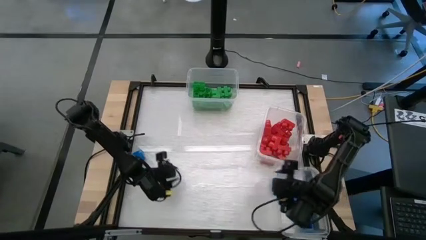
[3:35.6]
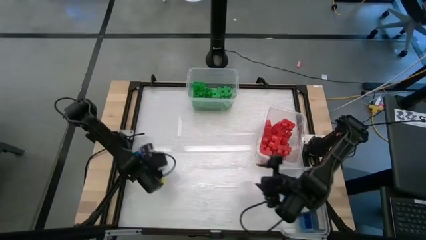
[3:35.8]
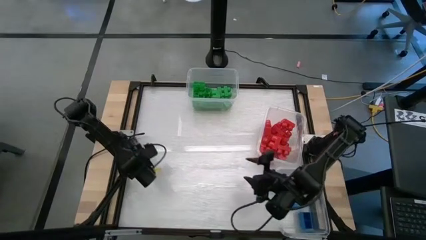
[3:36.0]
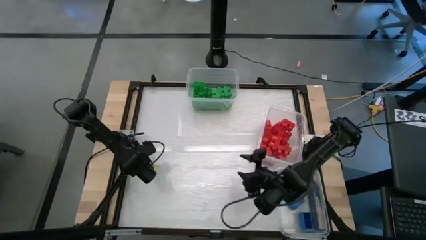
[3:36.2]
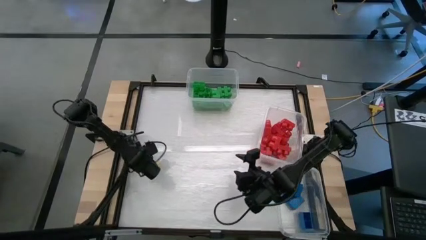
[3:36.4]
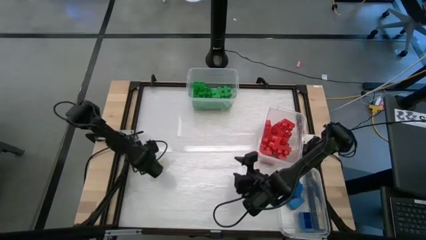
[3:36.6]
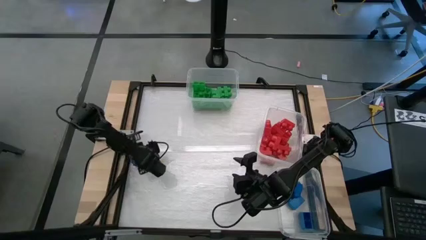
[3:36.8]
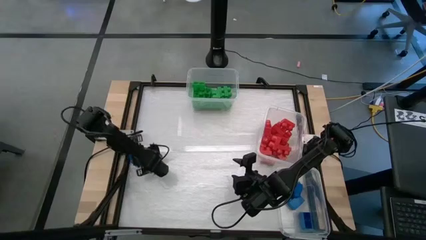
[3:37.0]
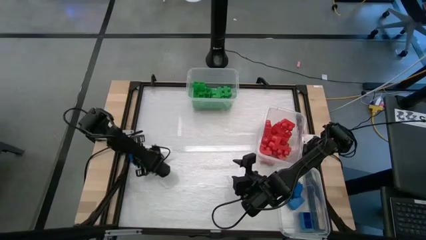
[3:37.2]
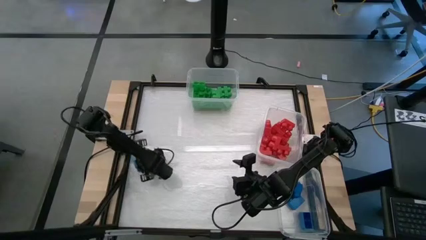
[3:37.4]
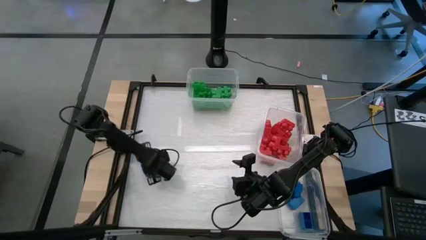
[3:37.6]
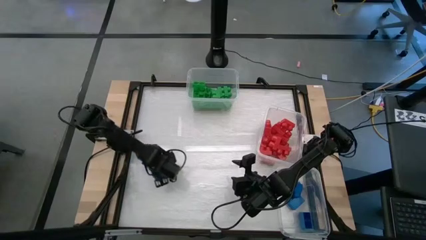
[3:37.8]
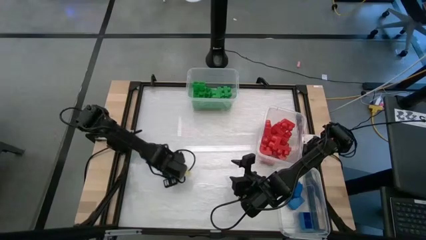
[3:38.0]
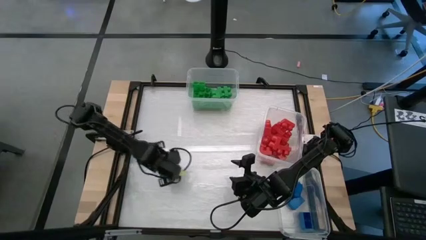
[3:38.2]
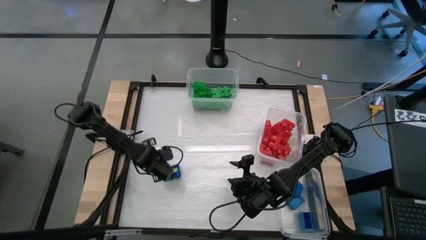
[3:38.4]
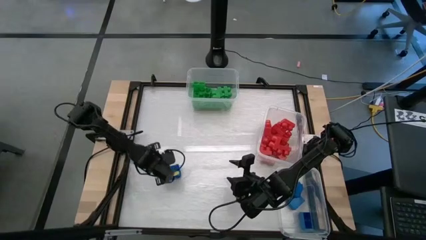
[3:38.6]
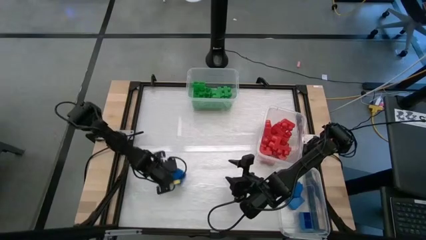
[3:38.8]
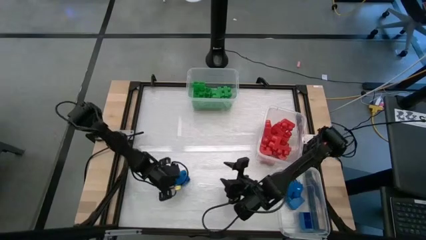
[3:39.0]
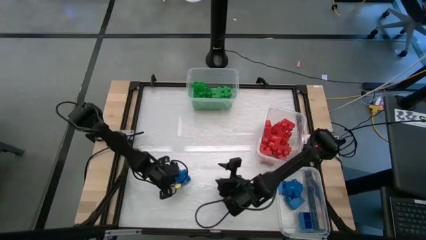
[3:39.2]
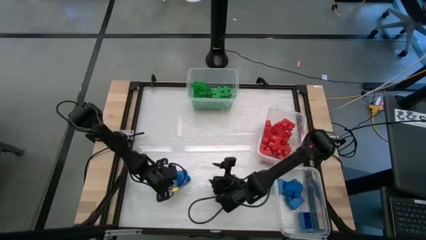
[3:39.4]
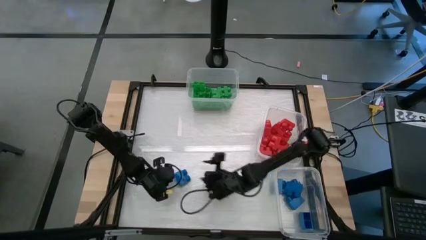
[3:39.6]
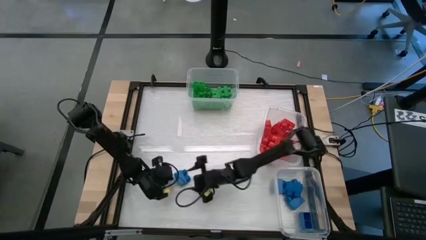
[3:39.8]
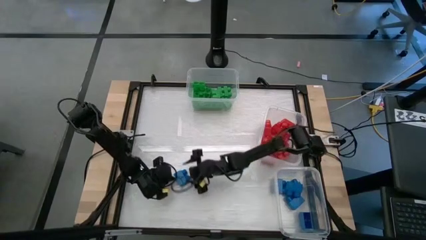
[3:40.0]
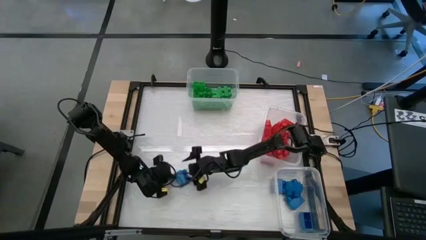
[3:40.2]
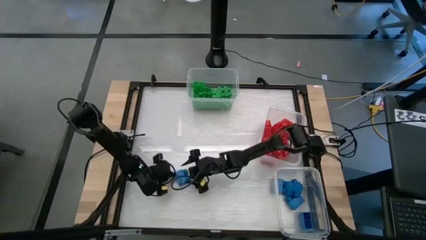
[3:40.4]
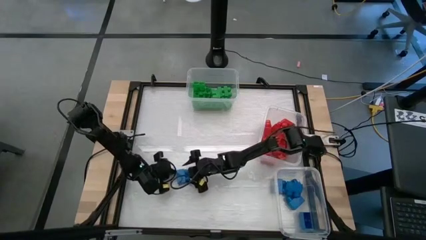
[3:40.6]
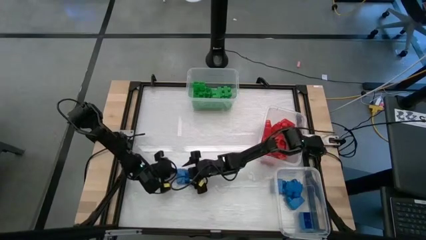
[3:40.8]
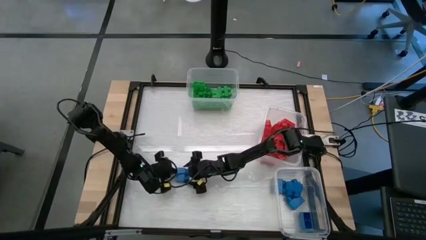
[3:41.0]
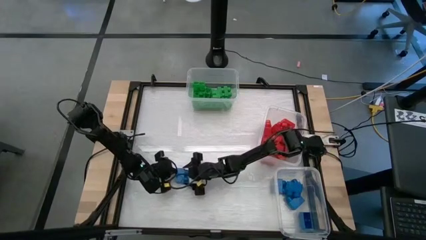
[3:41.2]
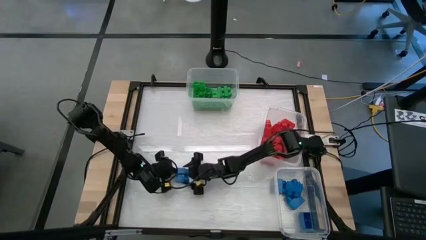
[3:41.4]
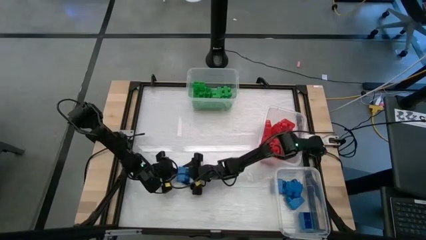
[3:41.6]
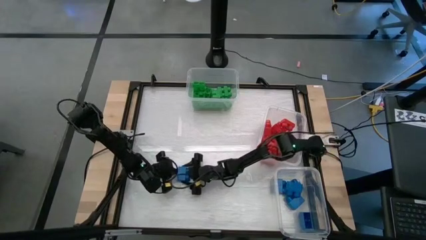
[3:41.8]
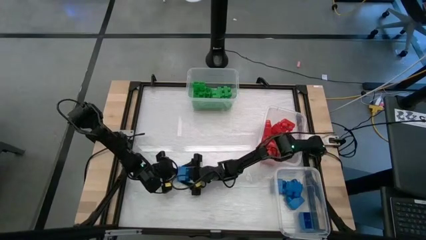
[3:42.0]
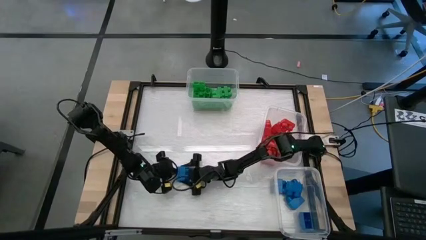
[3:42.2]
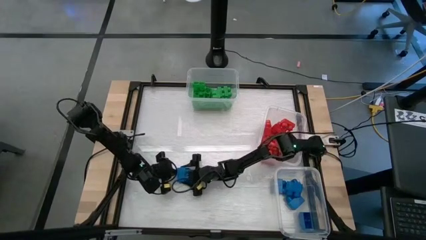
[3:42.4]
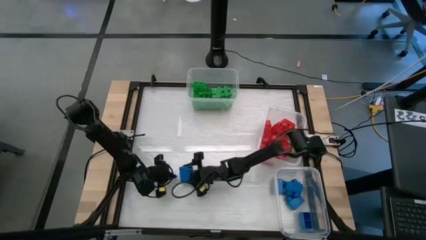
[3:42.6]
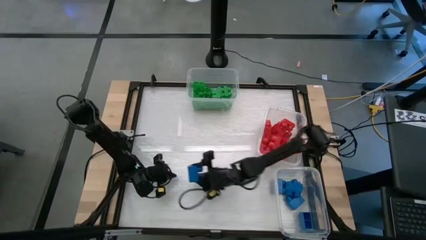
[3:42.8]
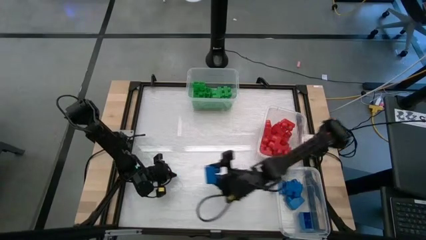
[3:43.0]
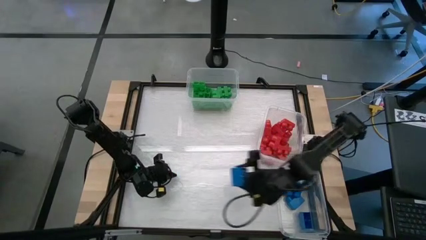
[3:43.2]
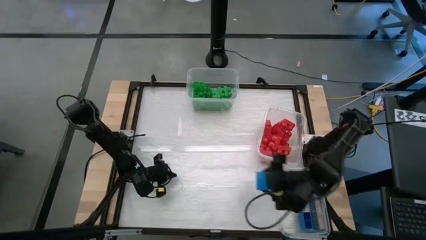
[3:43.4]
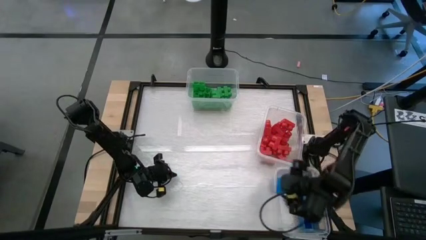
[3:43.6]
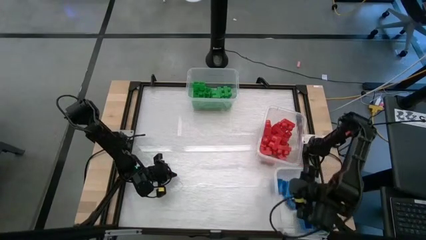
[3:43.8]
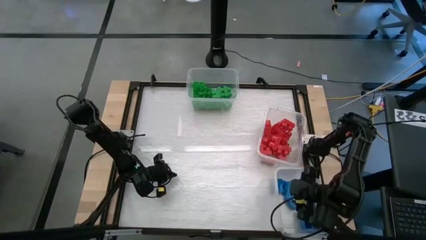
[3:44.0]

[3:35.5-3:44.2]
Task: Sort blocks
Put the blue game piece into the bottom right transparent bin

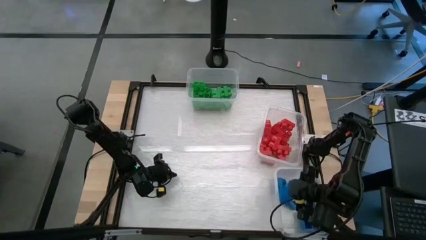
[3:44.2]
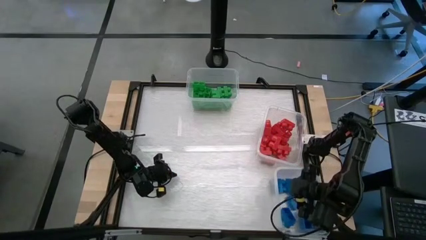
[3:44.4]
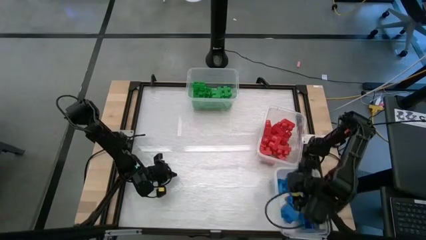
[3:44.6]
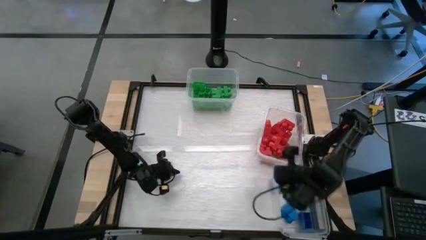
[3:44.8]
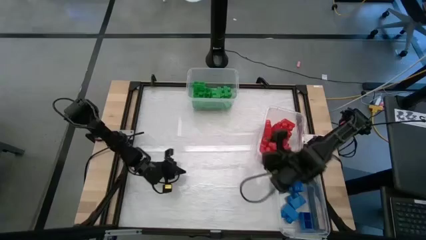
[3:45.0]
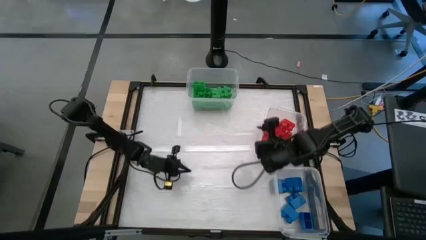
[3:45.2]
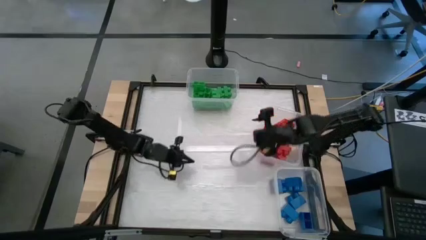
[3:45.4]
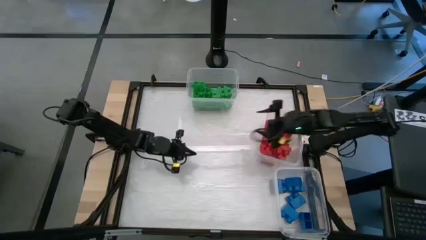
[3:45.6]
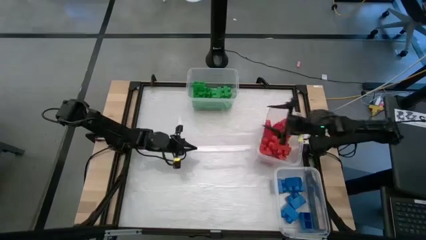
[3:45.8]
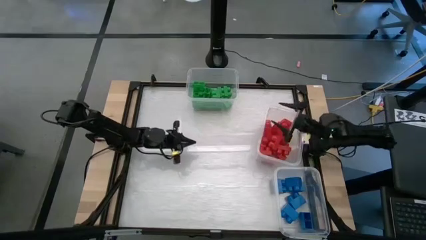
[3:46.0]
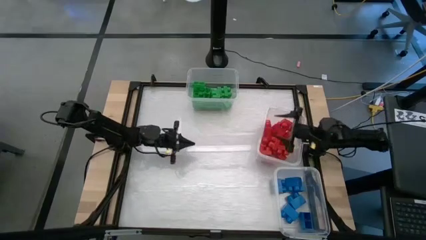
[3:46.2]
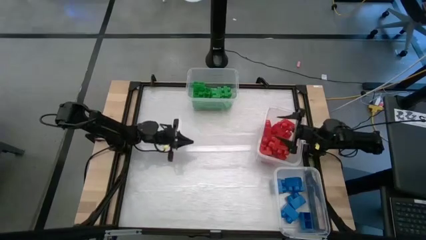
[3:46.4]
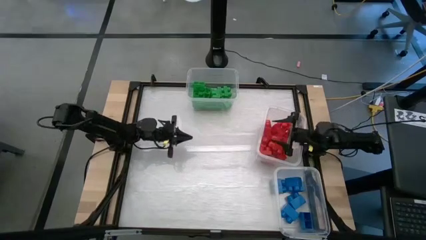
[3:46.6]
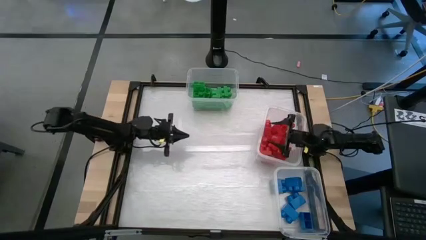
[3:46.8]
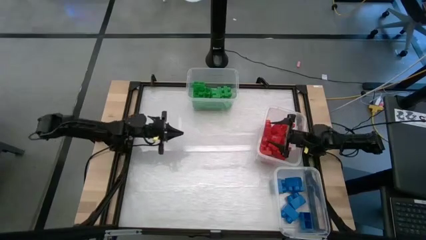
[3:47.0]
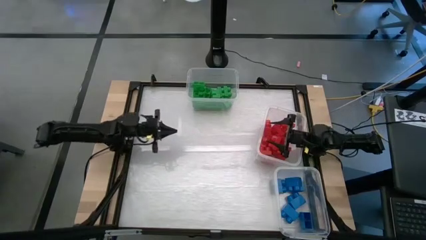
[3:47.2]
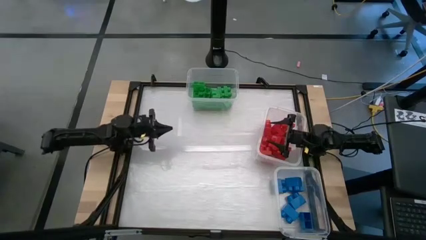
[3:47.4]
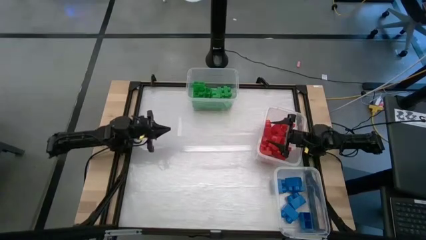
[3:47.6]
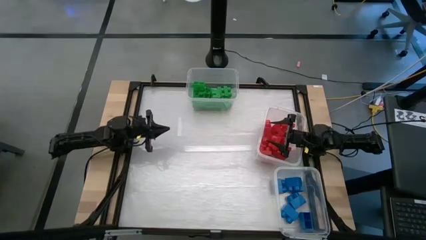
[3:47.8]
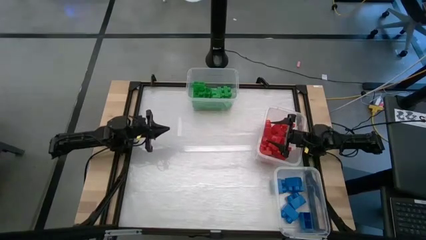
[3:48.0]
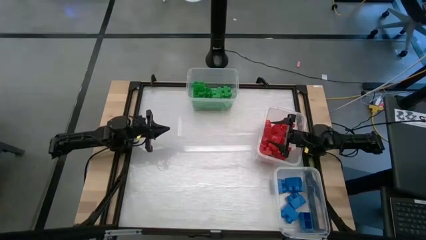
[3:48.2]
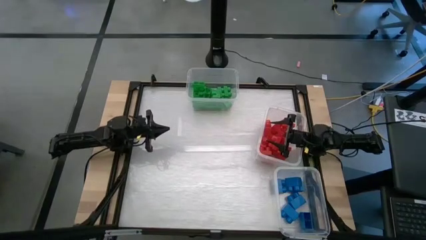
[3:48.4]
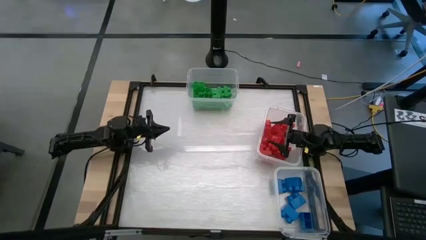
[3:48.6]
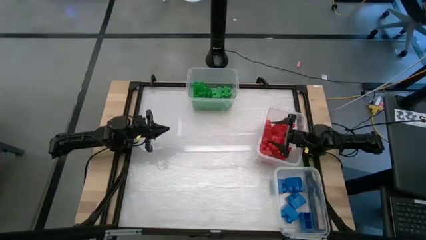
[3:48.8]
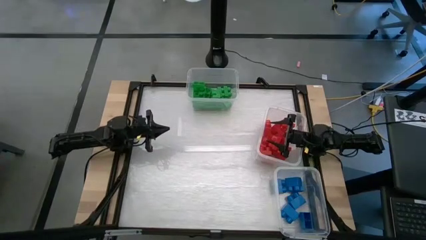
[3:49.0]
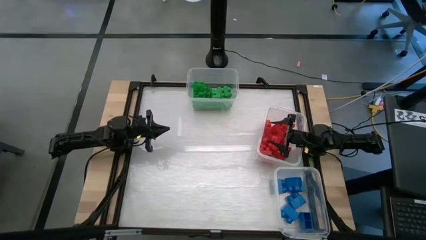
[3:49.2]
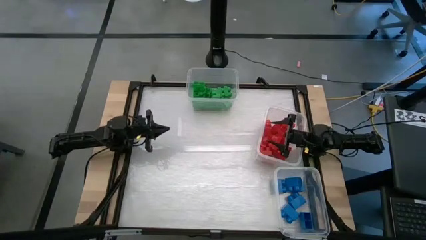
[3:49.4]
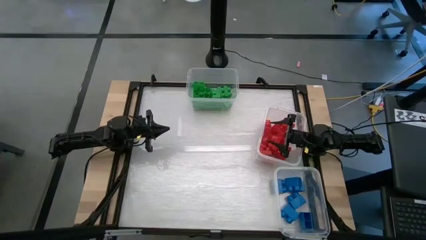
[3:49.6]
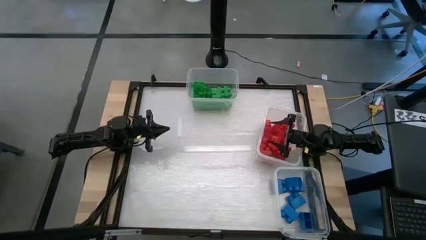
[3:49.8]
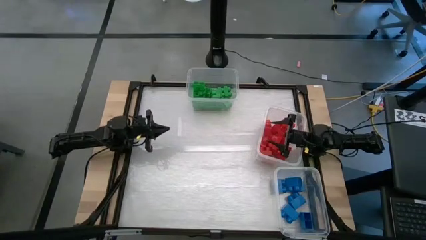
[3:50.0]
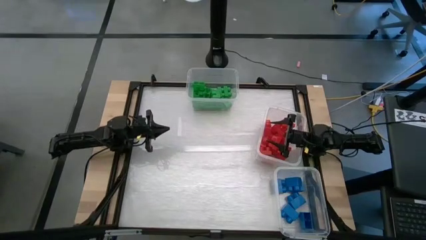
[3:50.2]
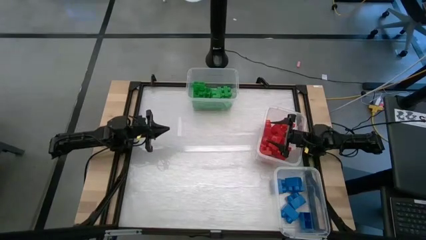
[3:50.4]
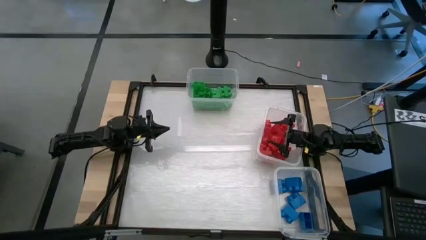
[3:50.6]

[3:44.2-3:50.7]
Return to Home Position
